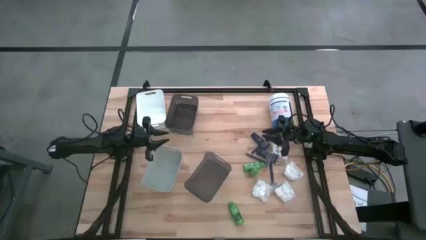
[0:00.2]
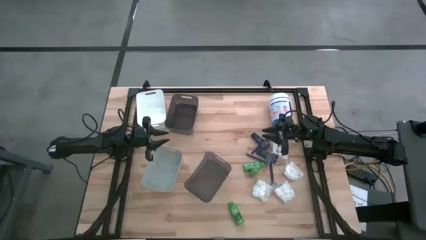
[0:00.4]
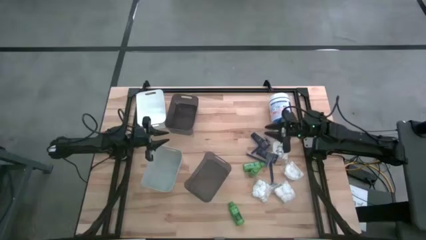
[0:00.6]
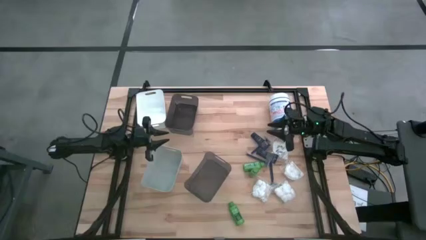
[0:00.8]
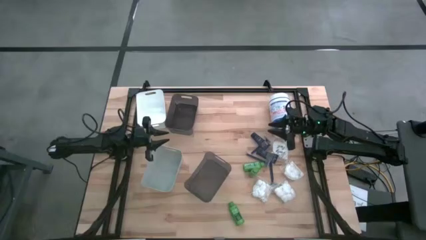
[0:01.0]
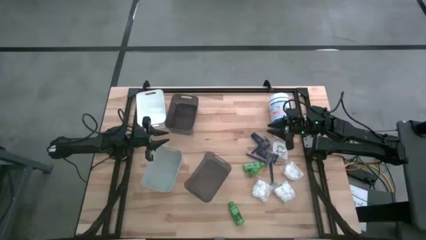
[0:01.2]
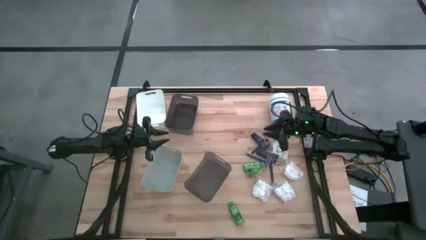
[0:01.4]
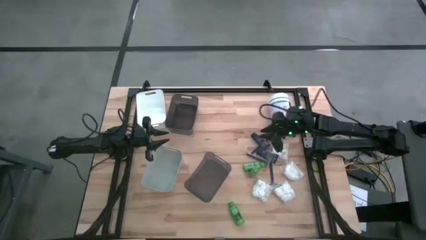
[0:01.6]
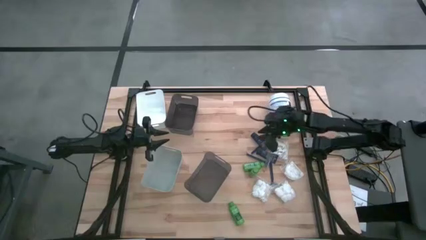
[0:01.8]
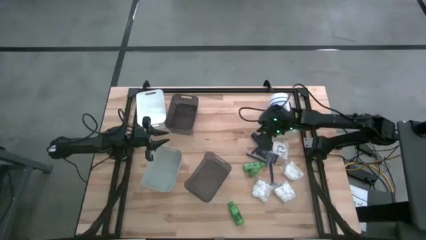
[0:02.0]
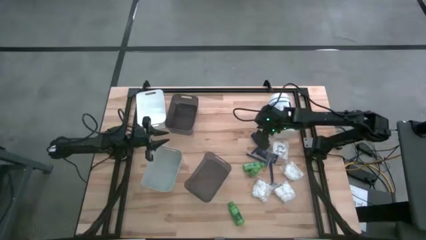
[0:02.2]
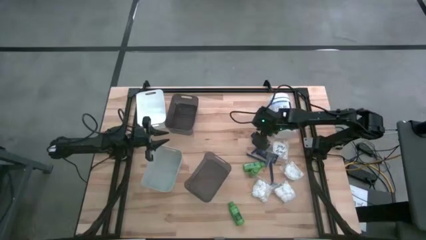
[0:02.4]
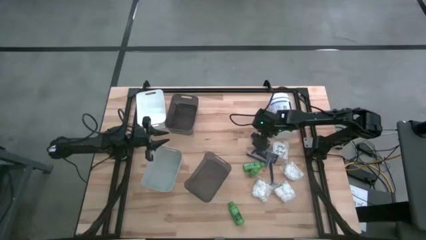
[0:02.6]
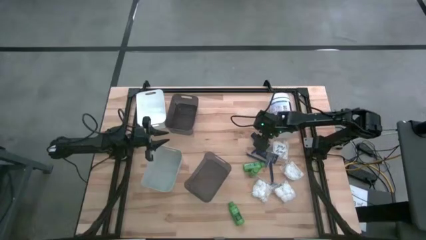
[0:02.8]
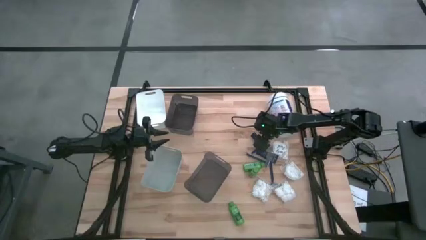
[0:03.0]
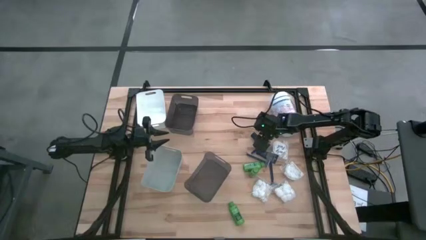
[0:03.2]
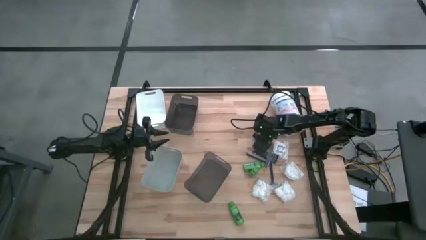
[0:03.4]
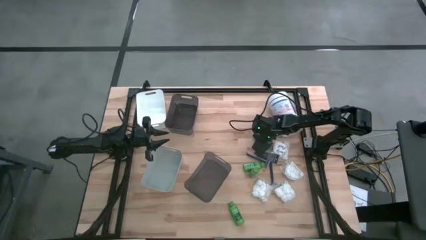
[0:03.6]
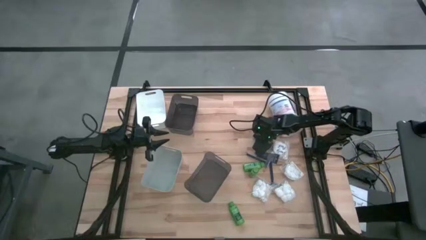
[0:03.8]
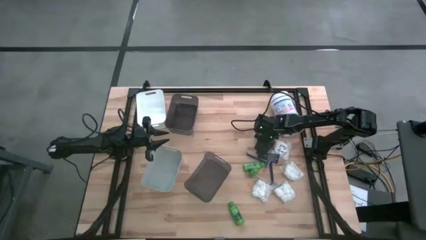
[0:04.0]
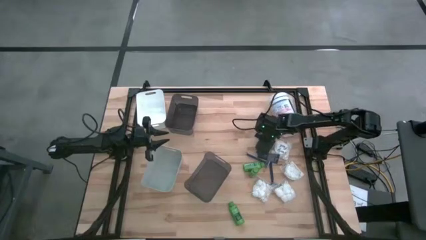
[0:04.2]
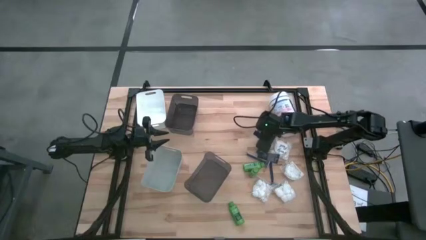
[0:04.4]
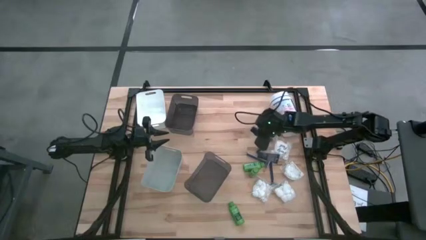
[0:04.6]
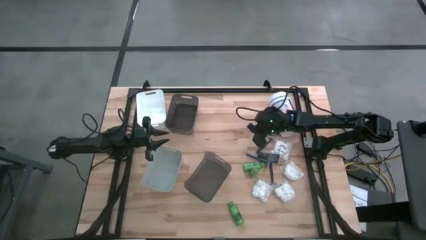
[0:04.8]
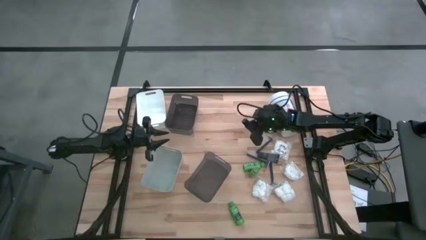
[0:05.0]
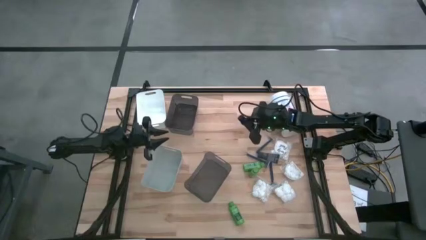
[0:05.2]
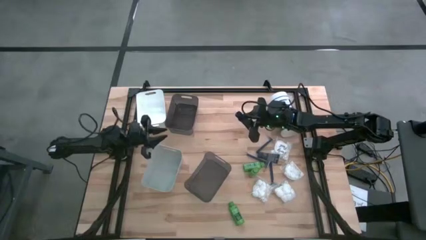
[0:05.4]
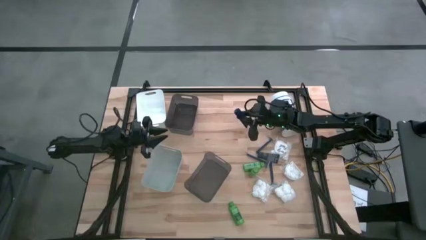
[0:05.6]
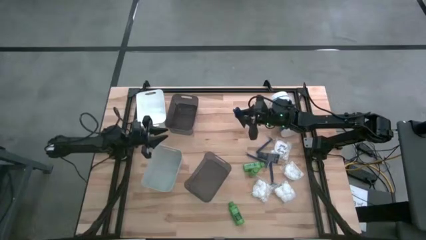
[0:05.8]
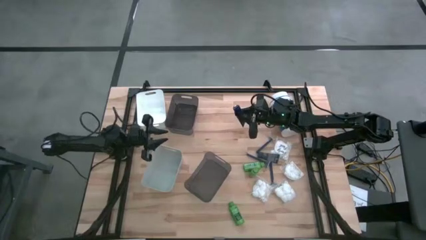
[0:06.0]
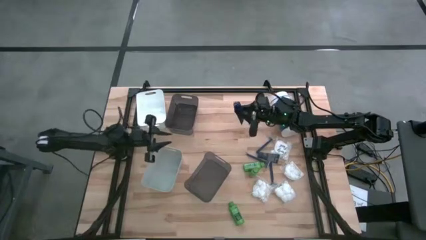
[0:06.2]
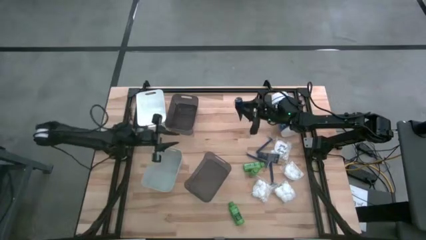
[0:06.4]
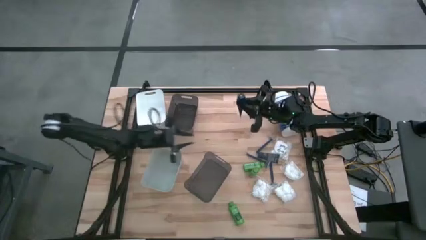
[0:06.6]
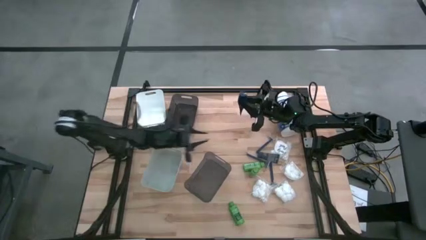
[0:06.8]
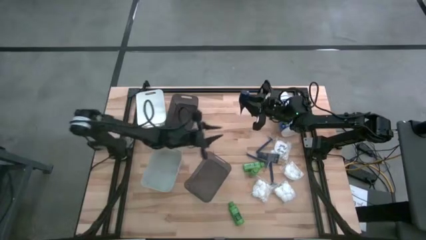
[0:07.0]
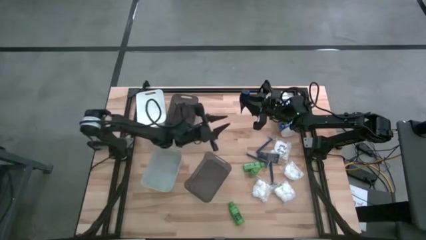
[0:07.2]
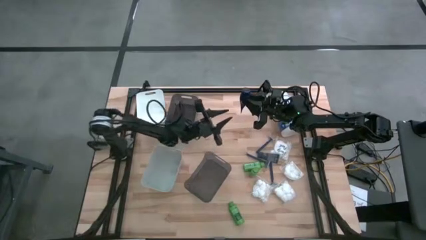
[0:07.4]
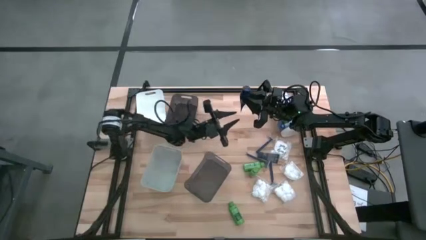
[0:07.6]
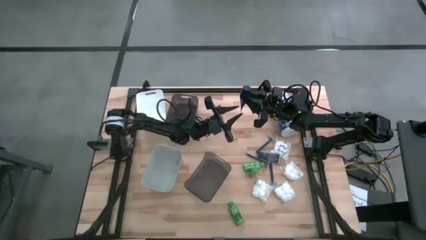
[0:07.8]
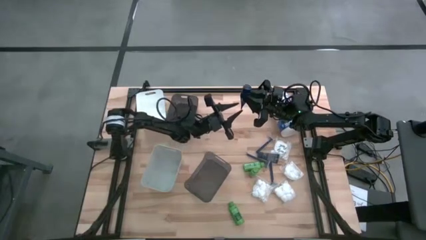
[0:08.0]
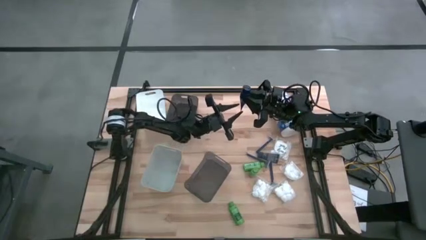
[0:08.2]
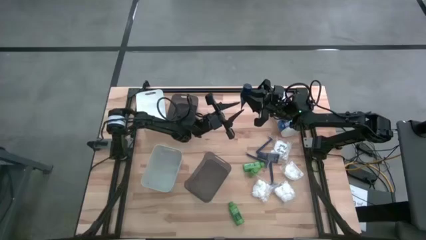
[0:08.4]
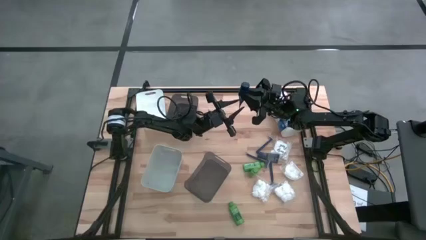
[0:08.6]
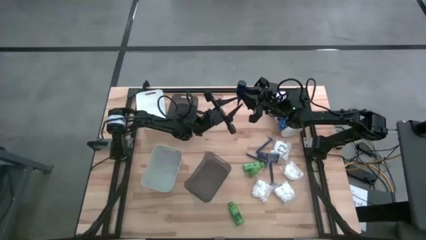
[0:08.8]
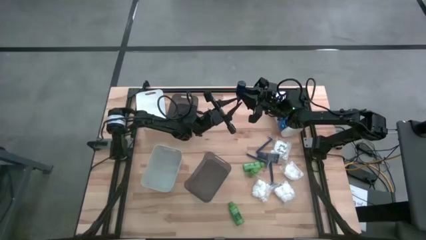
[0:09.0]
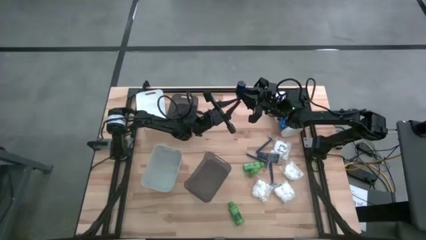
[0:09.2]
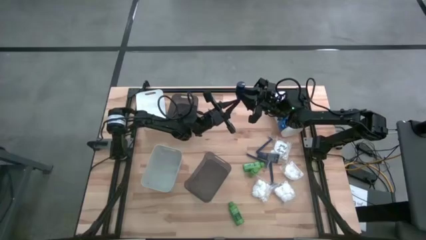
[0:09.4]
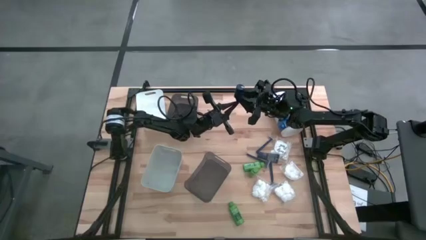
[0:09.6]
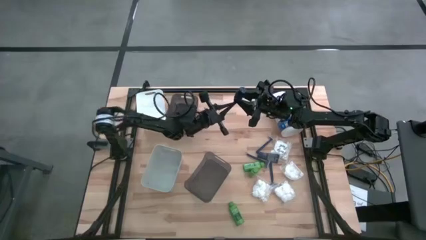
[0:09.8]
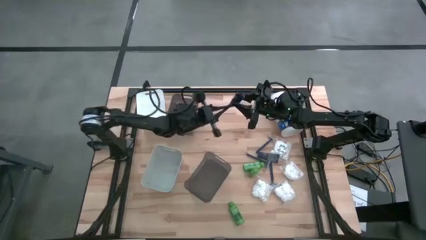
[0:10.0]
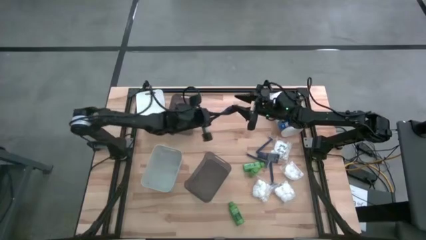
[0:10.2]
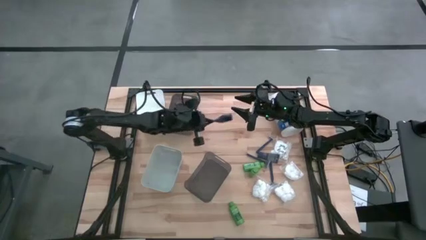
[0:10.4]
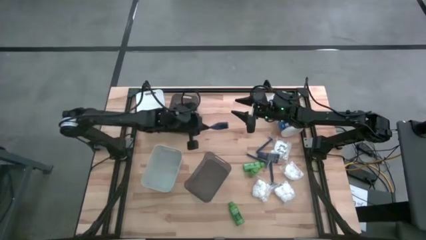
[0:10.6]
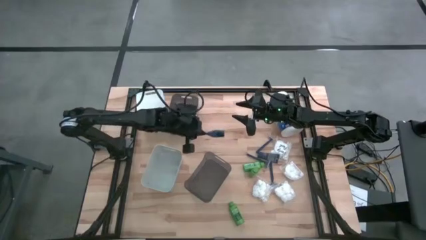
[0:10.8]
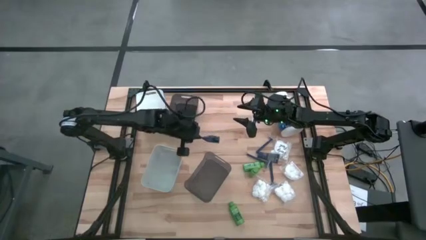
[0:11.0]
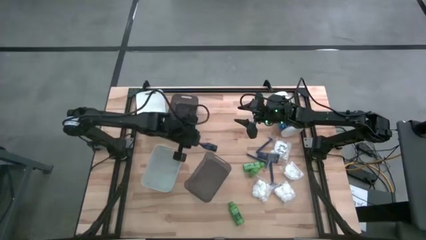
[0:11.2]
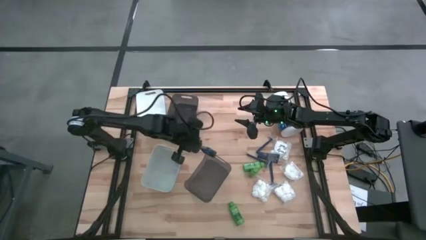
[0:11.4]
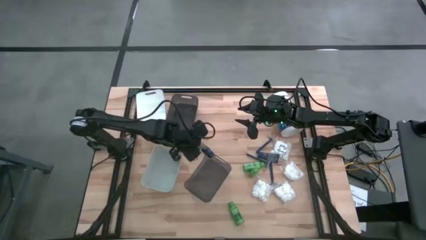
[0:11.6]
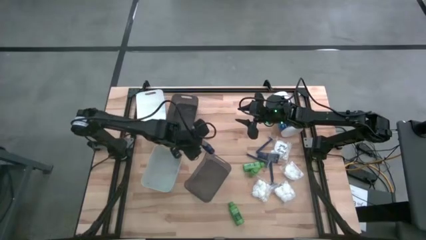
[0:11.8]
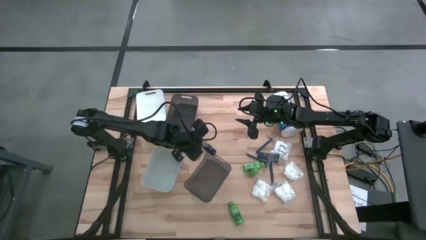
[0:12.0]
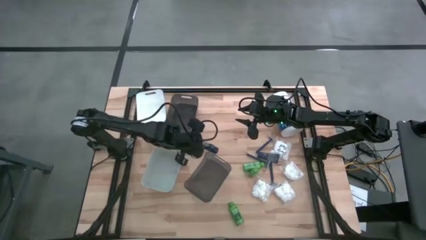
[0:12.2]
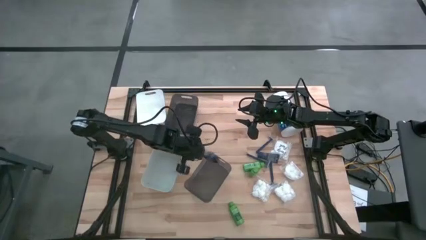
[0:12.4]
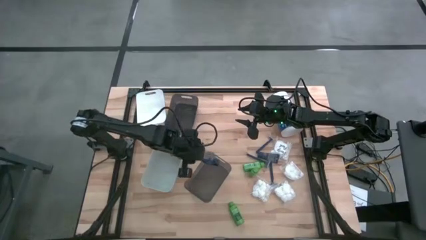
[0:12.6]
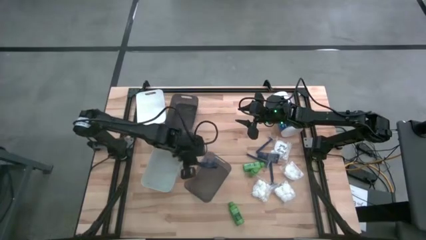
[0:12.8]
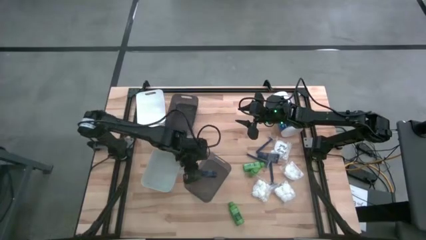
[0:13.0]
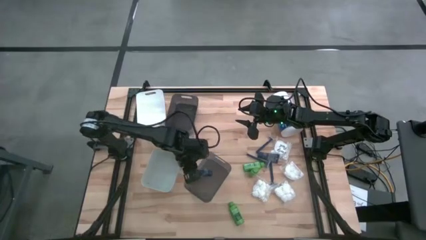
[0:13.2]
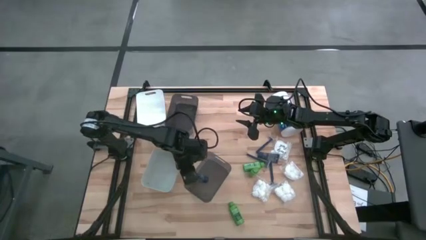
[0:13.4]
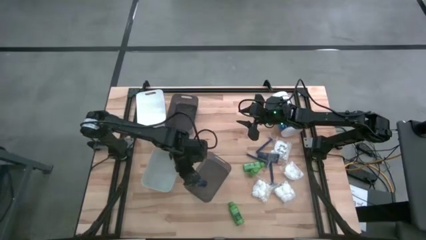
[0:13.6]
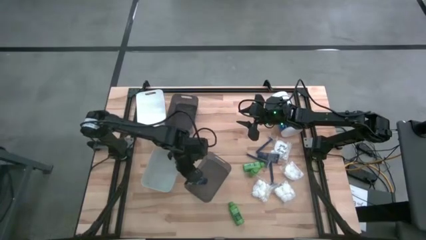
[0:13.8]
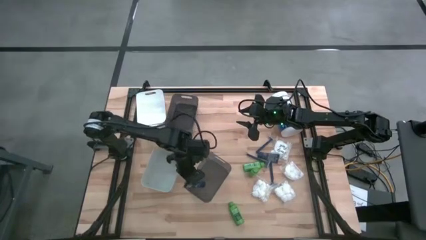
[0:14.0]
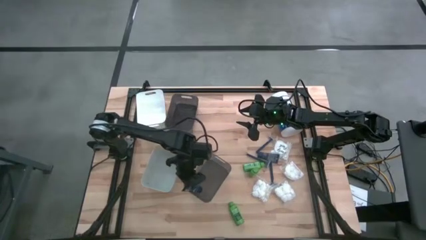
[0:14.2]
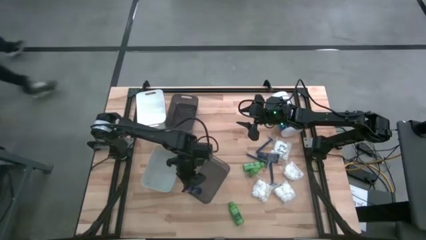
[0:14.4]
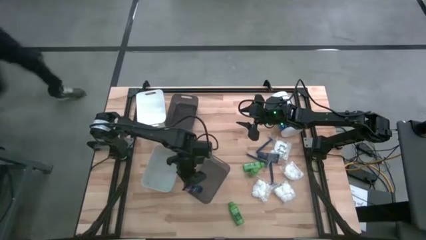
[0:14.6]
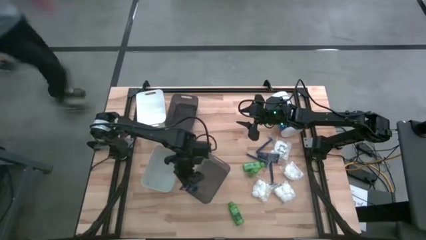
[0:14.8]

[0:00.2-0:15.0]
Task: Pick & Place Travel size toiletries
Put the top blue shave cream into the bottom black transparent bin
